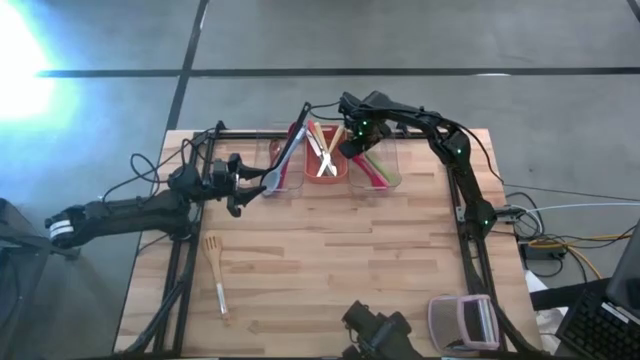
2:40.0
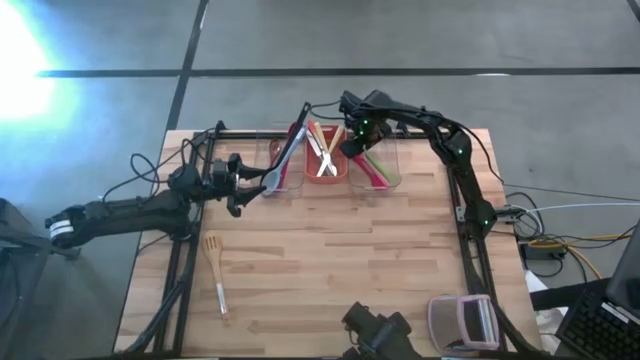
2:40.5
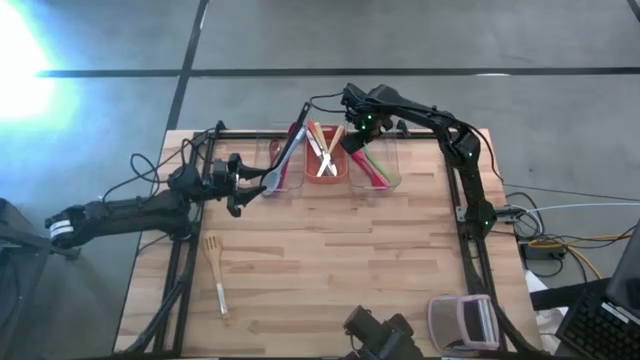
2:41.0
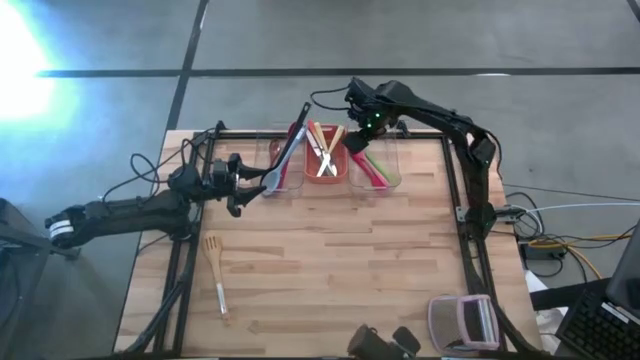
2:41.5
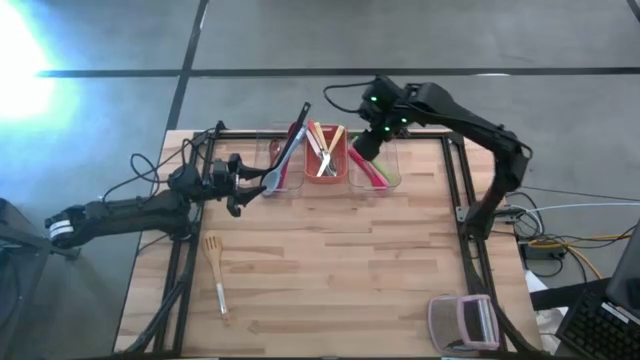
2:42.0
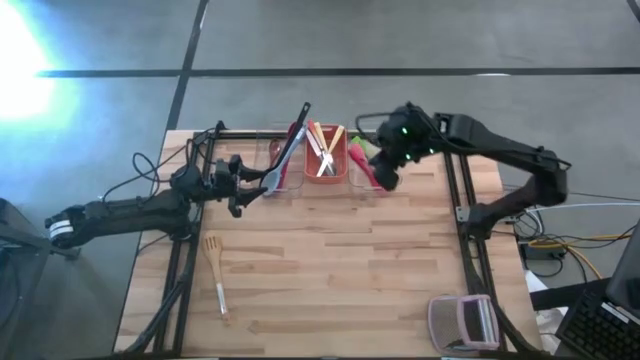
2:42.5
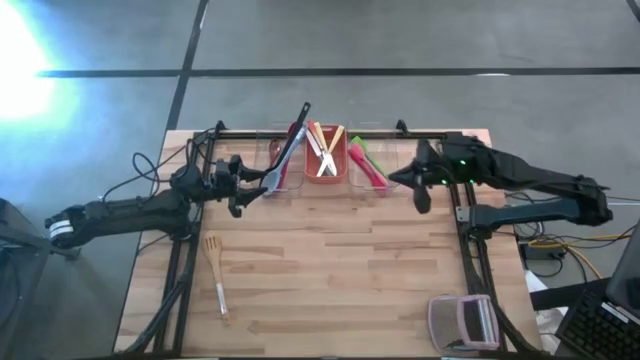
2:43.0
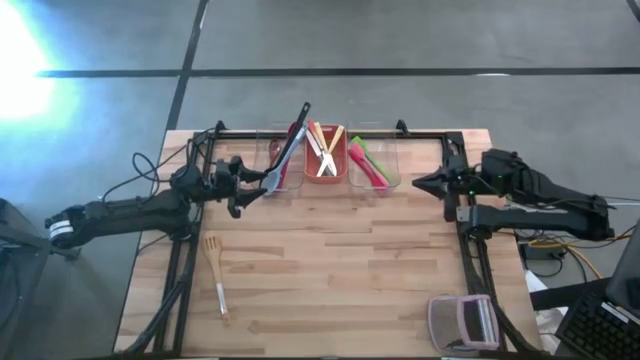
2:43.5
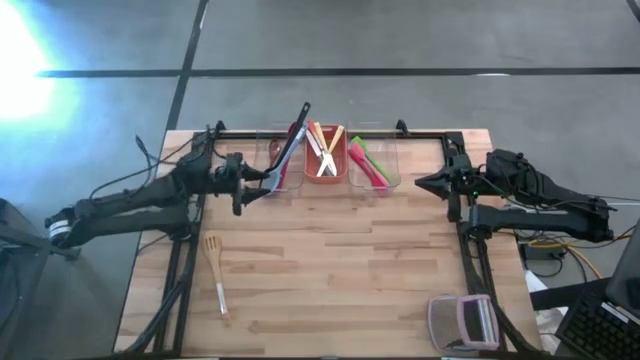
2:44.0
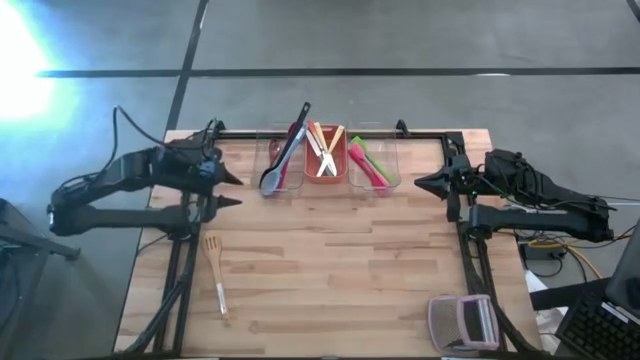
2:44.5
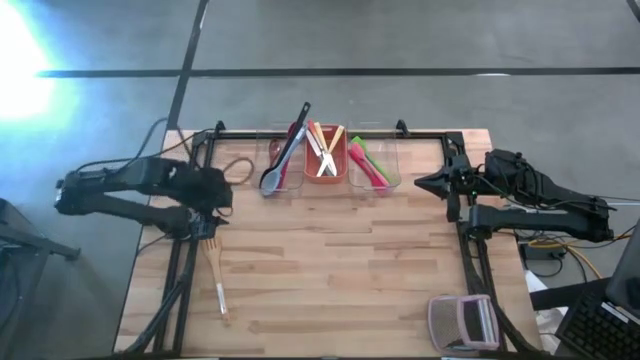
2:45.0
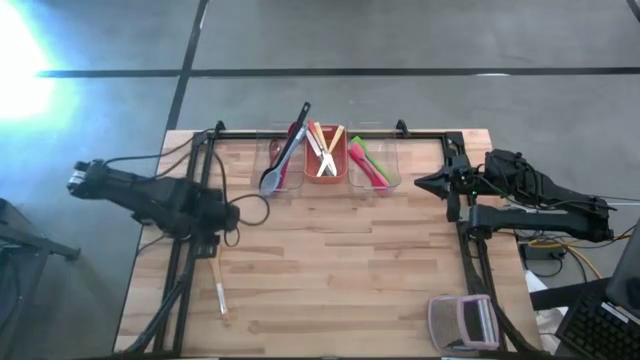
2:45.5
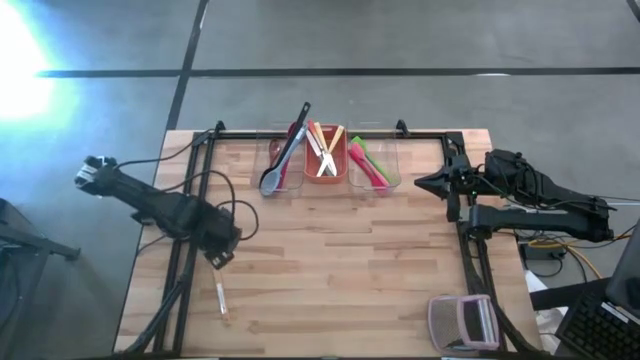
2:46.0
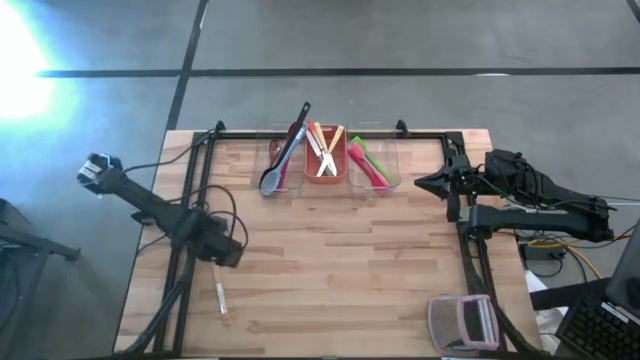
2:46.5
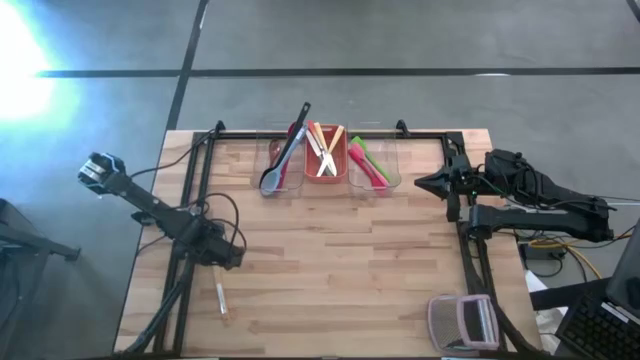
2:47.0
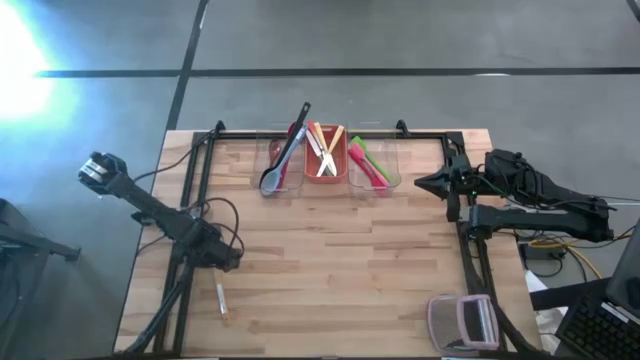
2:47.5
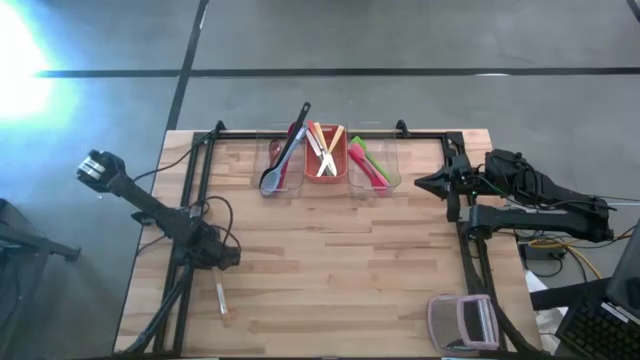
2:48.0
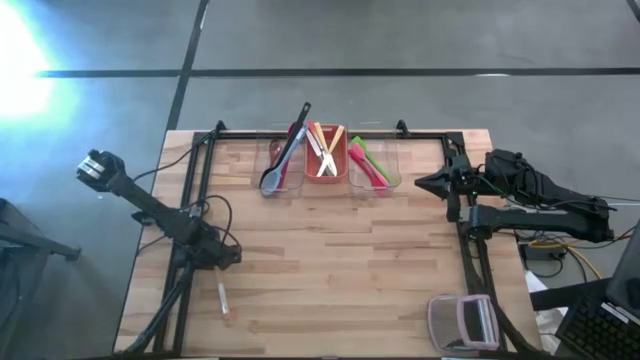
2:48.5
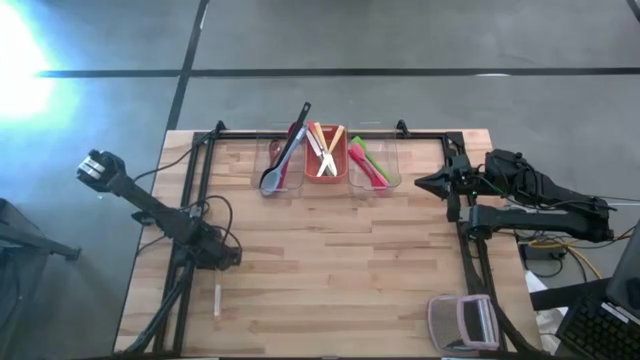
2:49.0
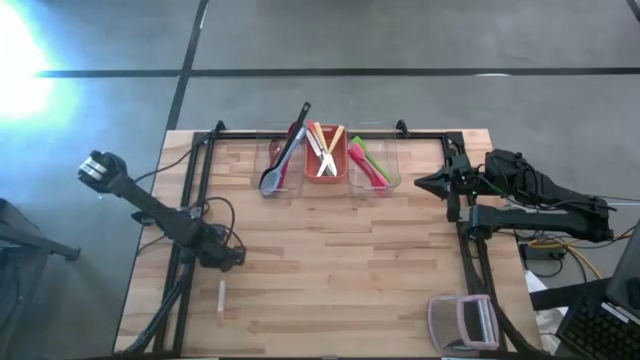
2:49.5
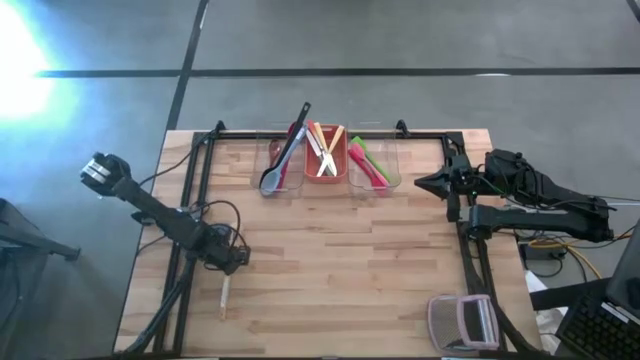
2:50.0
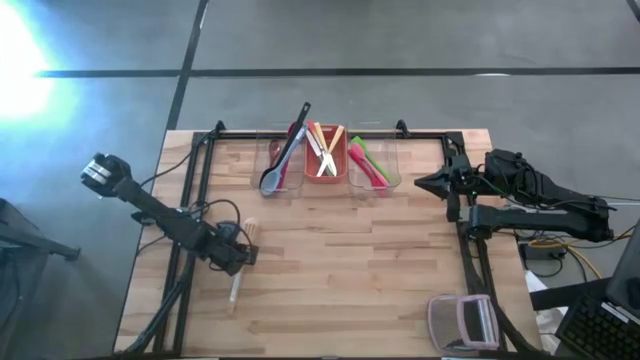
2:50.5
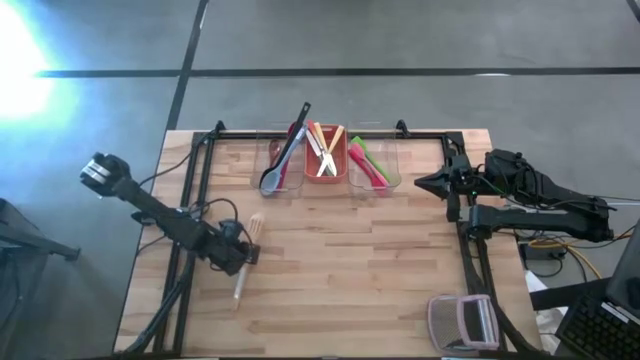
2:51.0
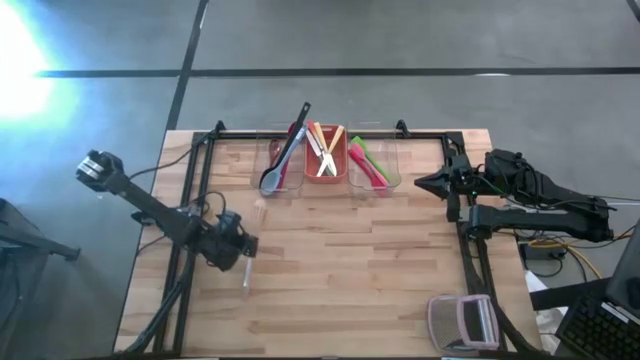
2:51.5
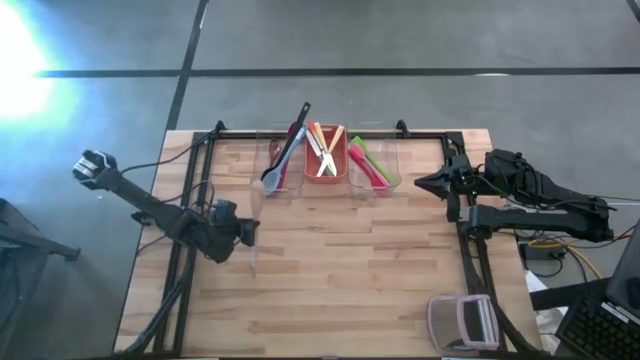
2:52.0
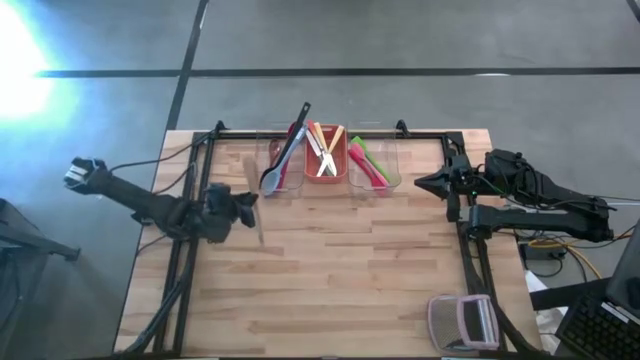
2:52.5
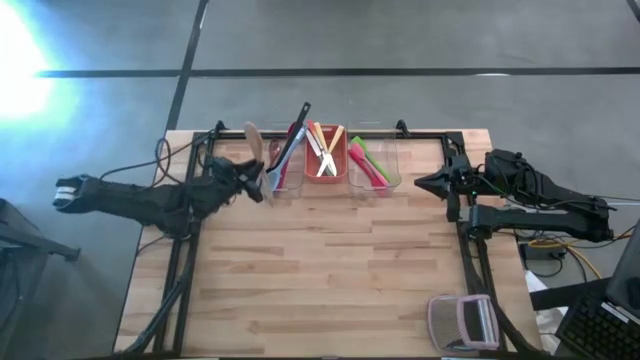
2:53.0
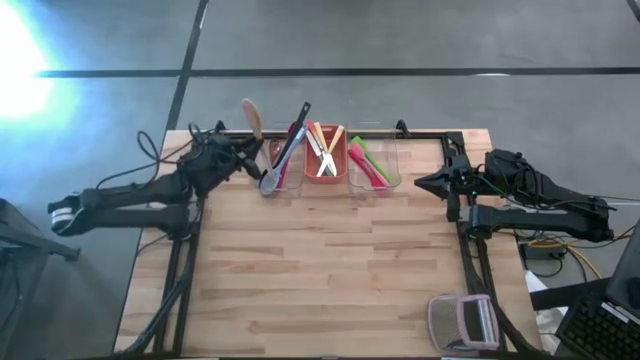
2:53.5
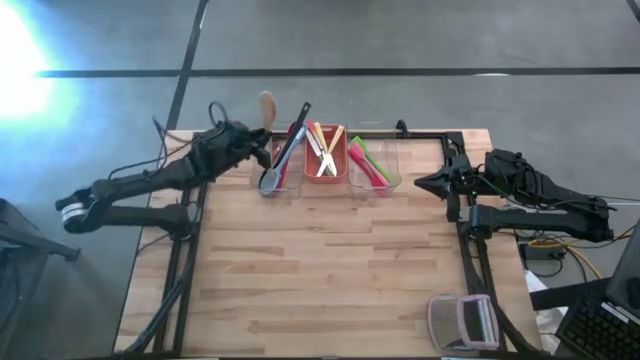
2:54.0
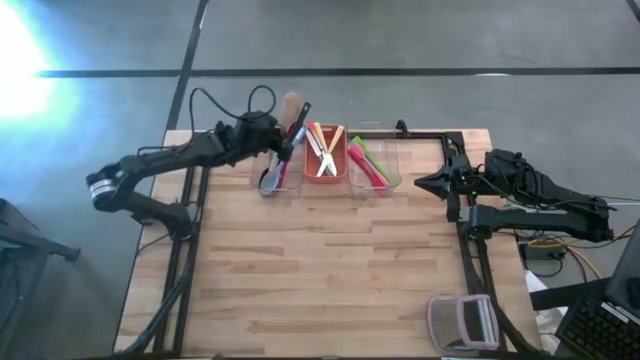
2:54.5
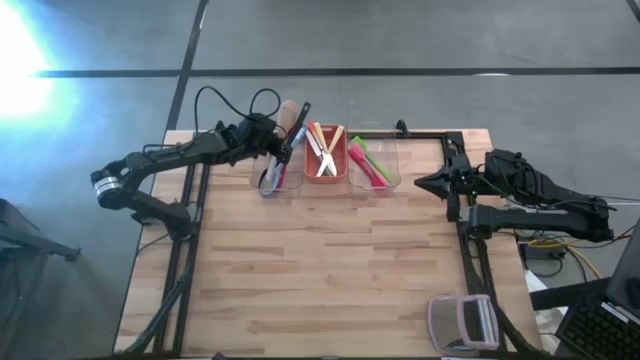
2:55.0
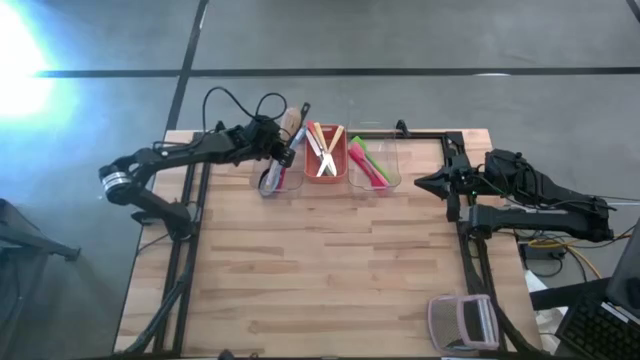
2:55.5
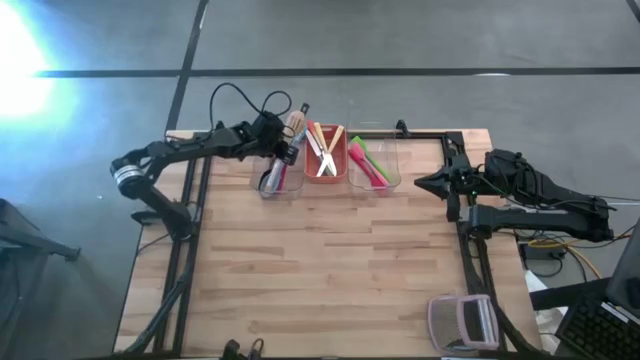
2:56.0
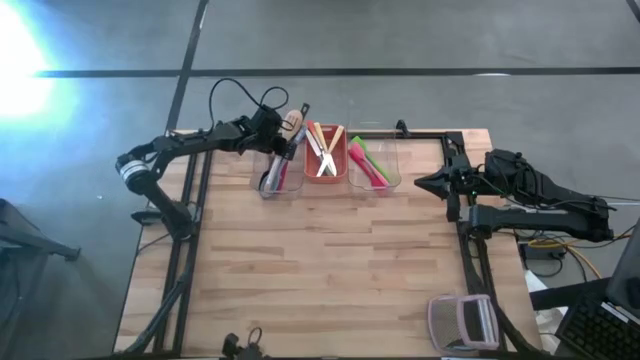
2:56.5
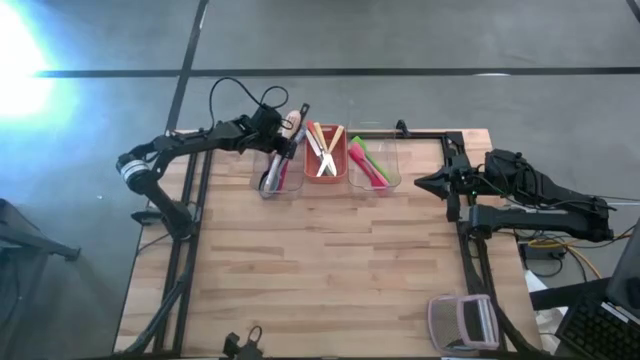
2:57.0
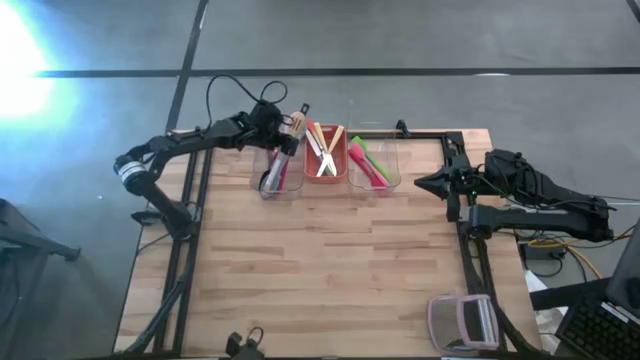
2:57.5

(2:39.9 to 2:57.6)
Task: Pick & Place Kitchen Items
Put the light brown serving spoon into the left transparent bin

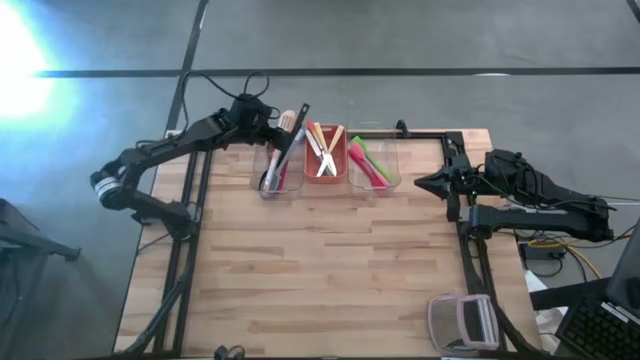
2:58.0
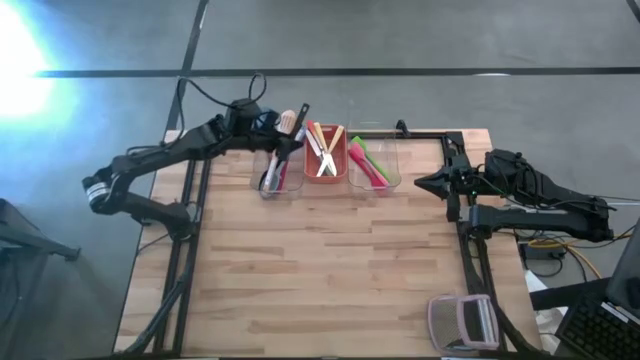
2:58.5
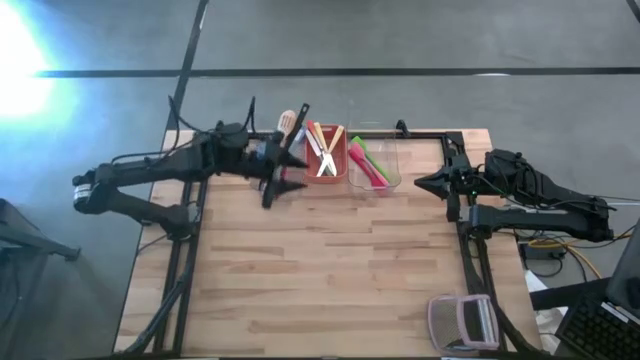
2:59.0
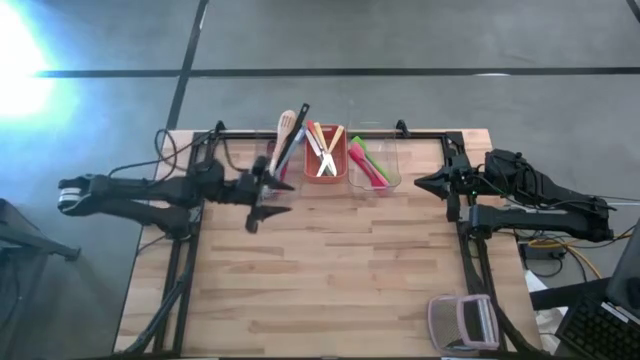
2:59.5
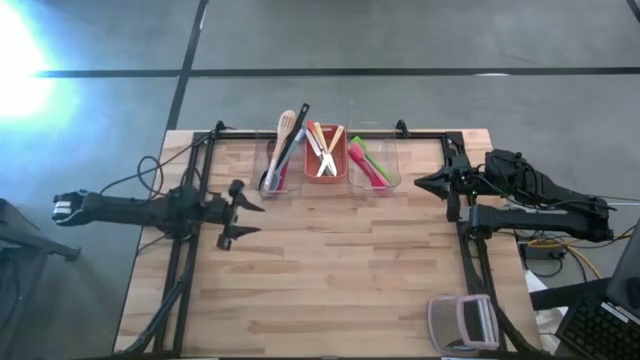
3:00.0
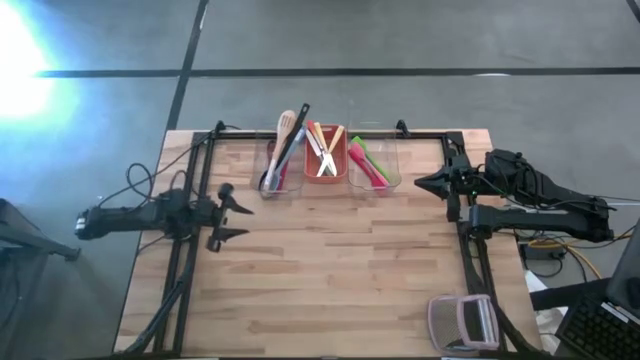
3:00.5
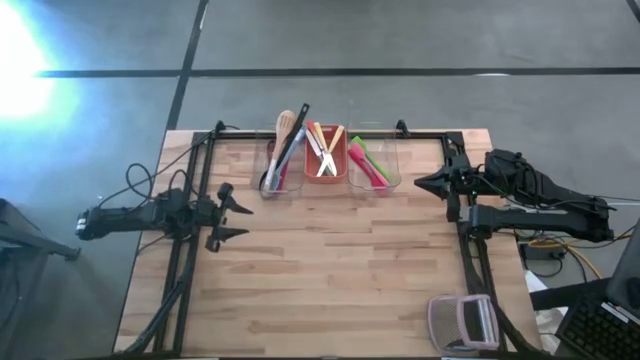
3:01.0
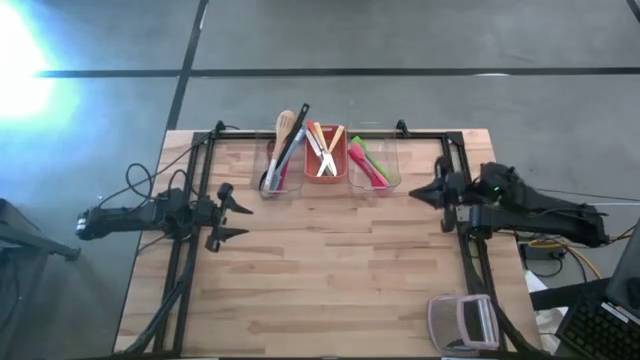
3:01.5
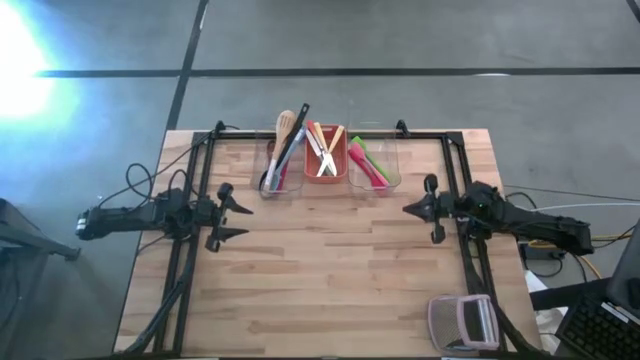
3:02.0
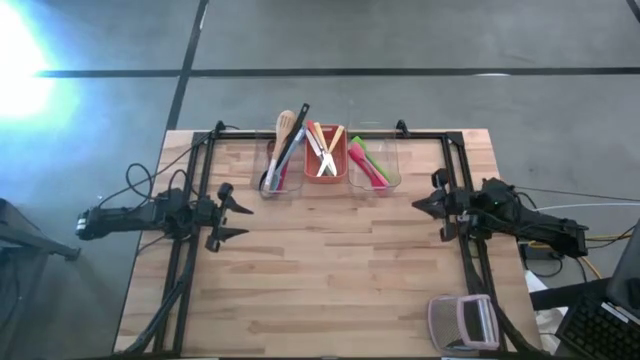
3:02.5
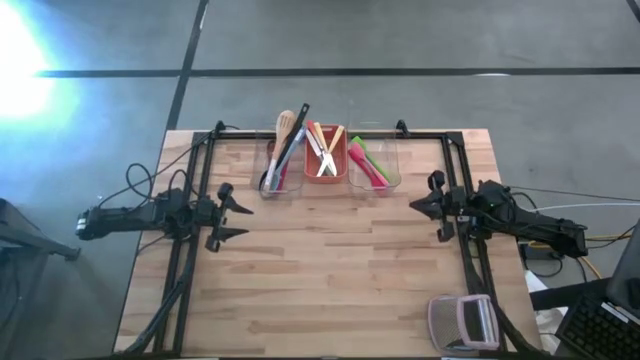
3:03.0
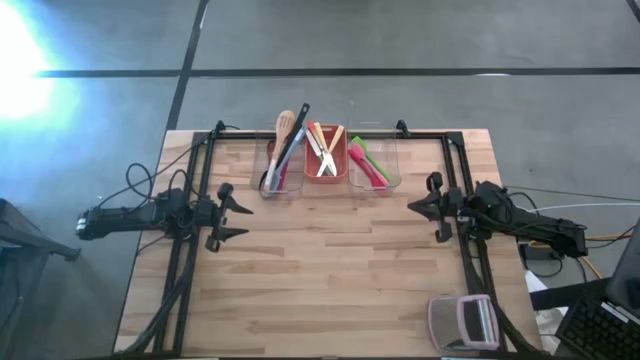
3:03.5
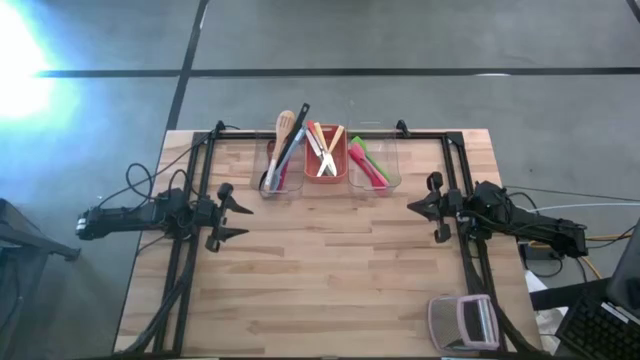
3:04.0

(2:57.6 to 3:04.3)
Return to Home Position
